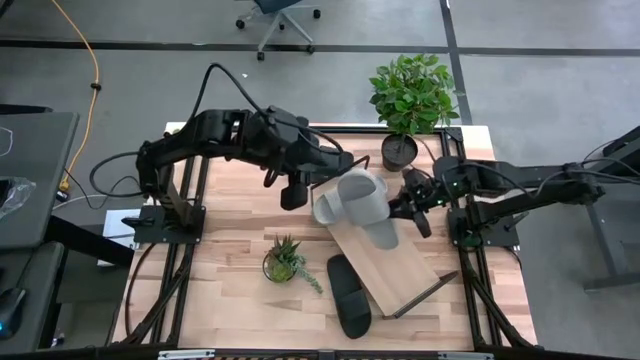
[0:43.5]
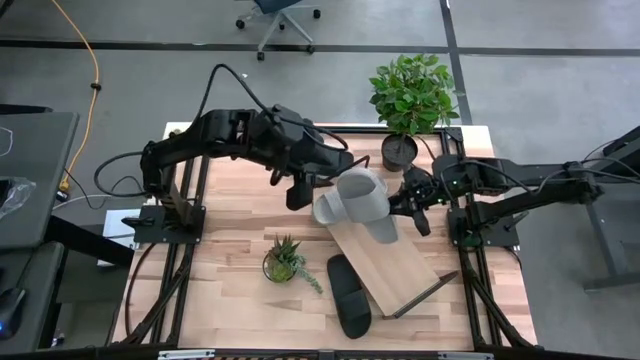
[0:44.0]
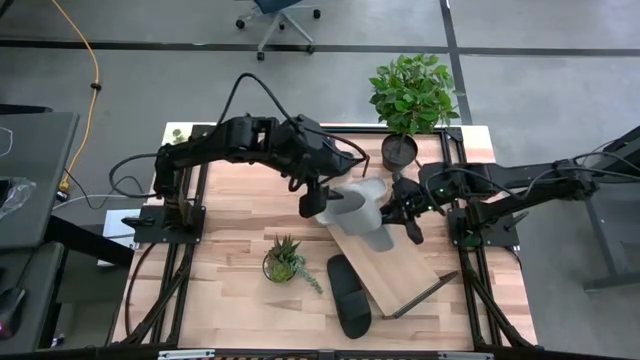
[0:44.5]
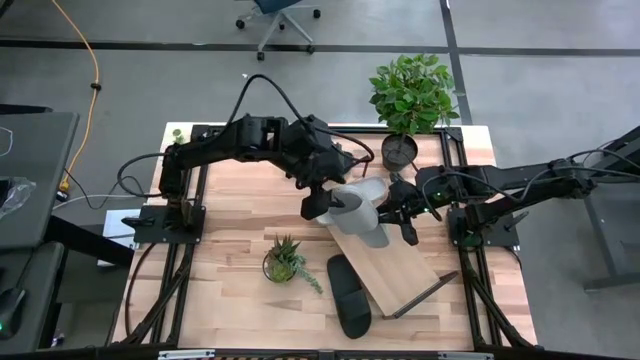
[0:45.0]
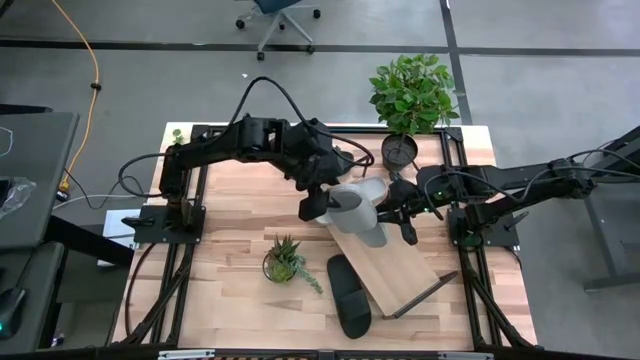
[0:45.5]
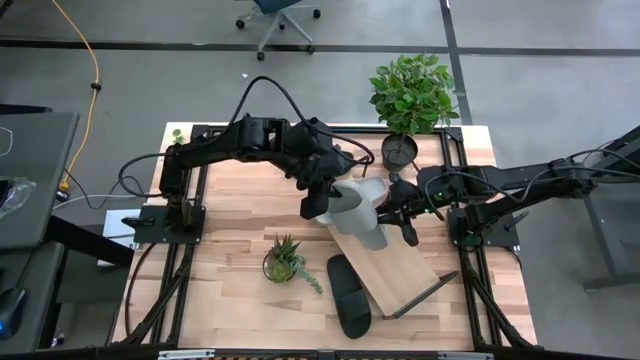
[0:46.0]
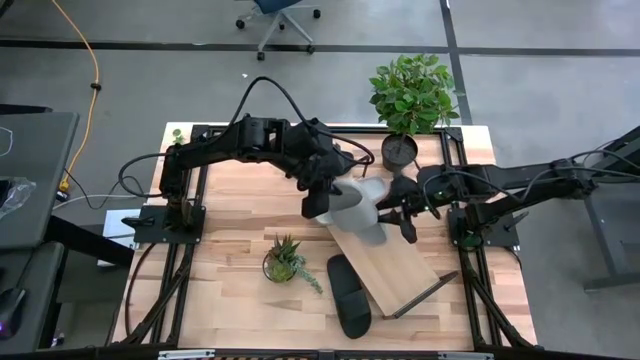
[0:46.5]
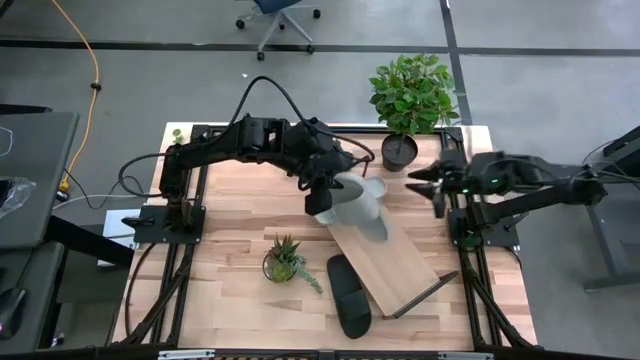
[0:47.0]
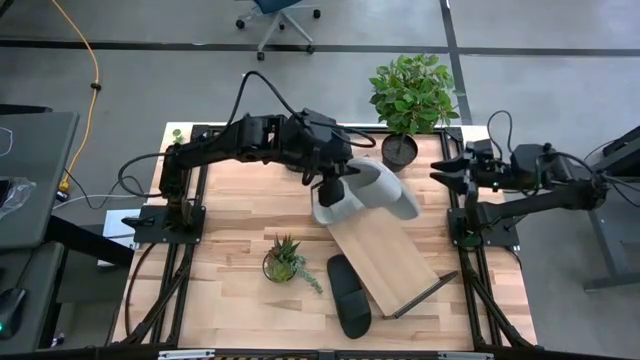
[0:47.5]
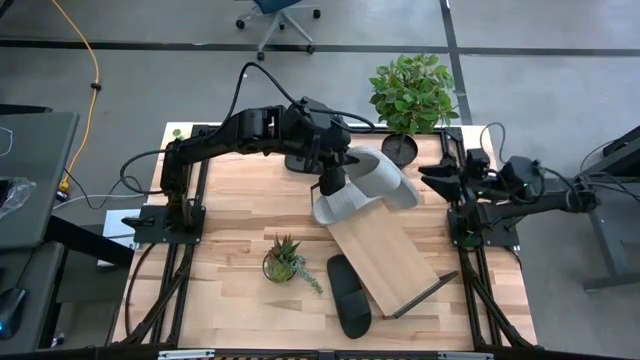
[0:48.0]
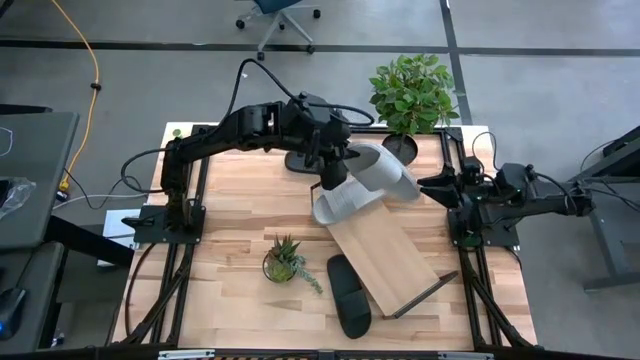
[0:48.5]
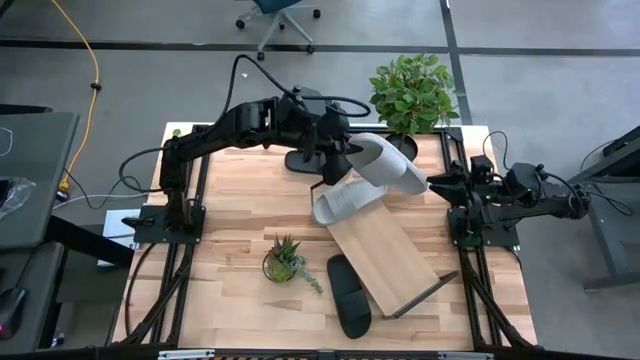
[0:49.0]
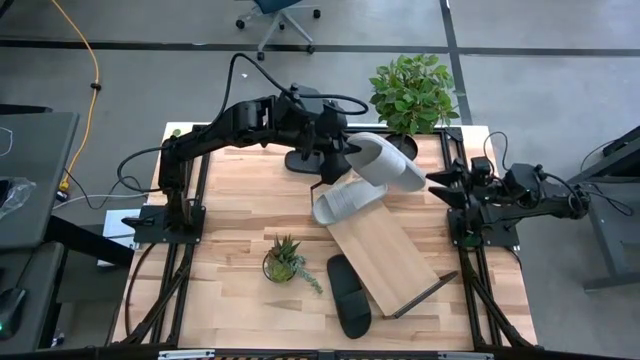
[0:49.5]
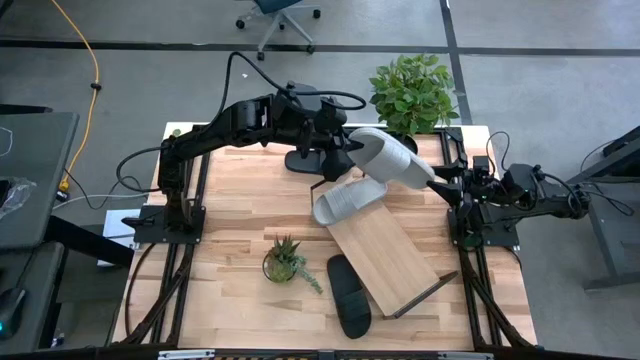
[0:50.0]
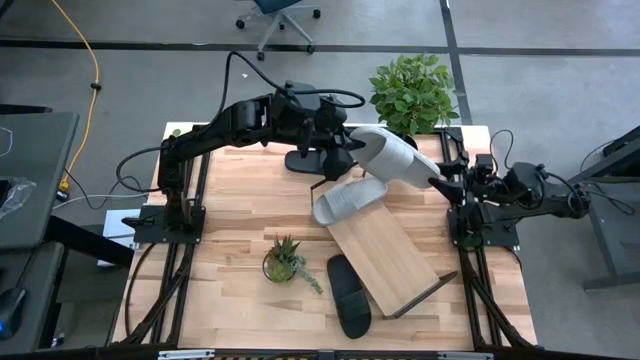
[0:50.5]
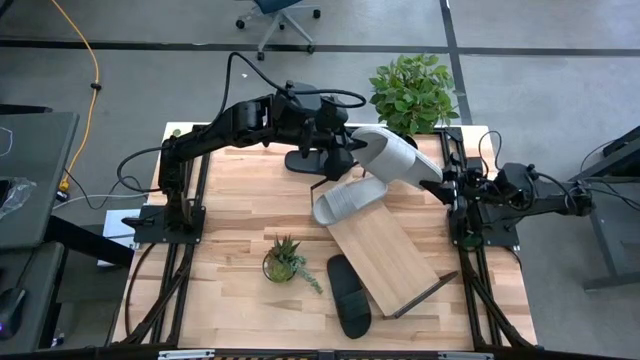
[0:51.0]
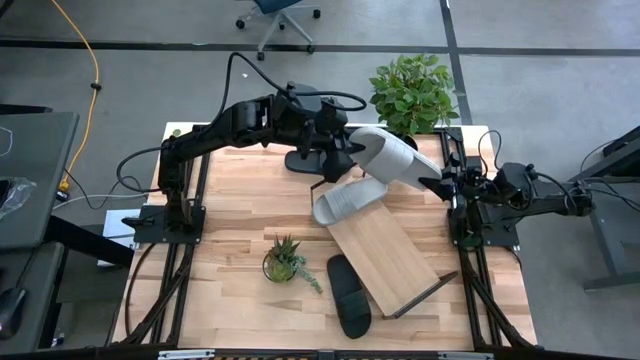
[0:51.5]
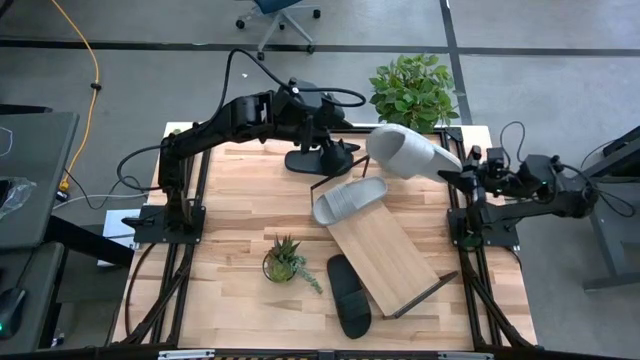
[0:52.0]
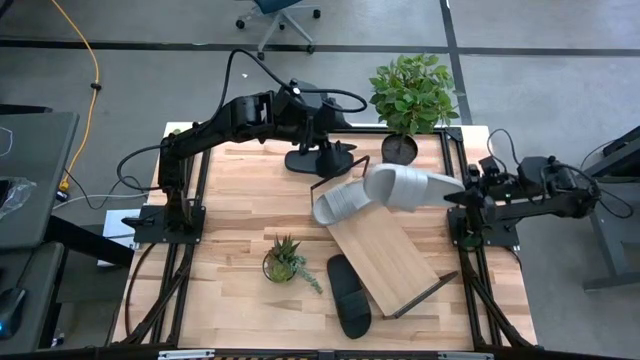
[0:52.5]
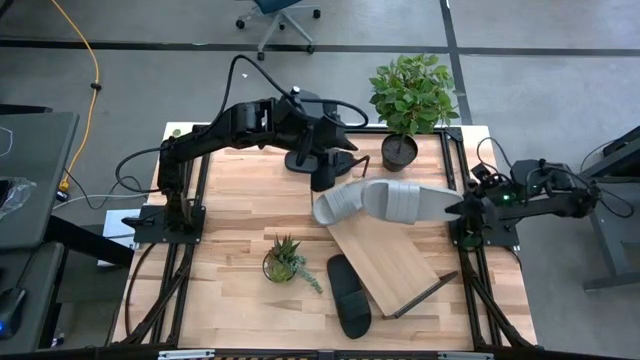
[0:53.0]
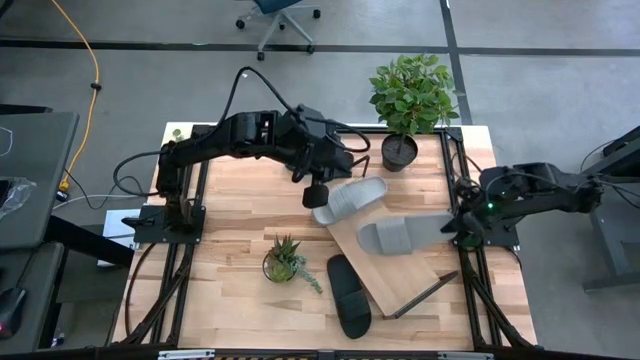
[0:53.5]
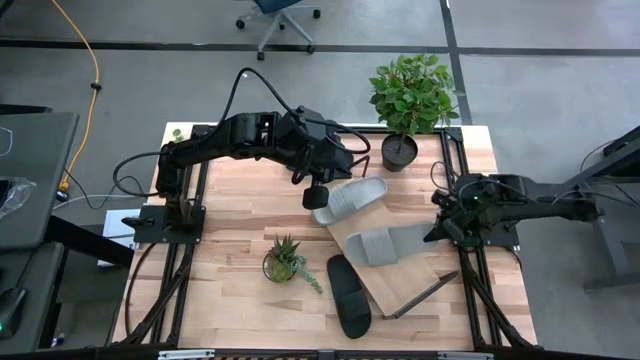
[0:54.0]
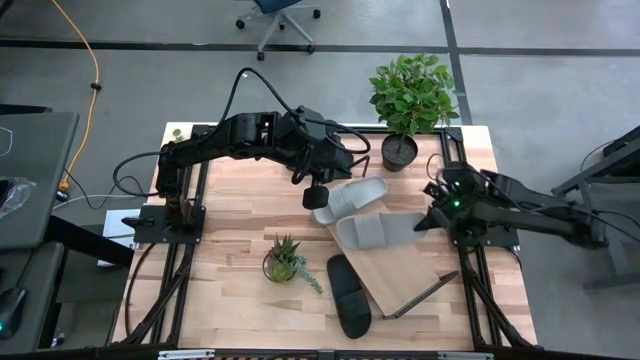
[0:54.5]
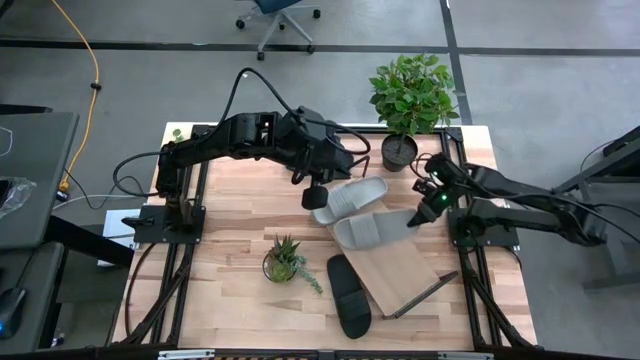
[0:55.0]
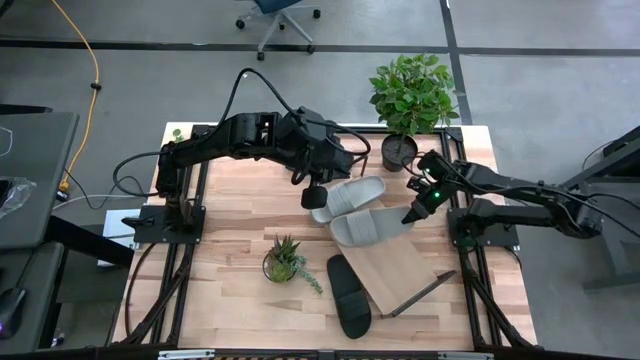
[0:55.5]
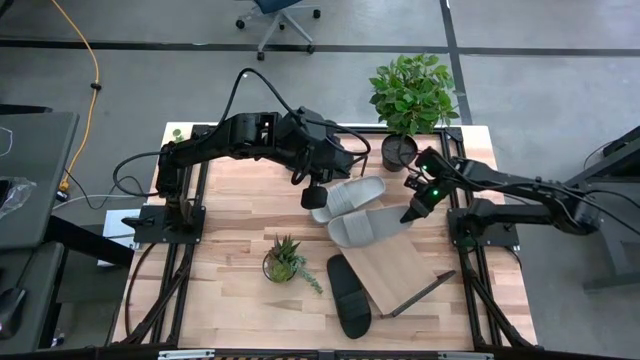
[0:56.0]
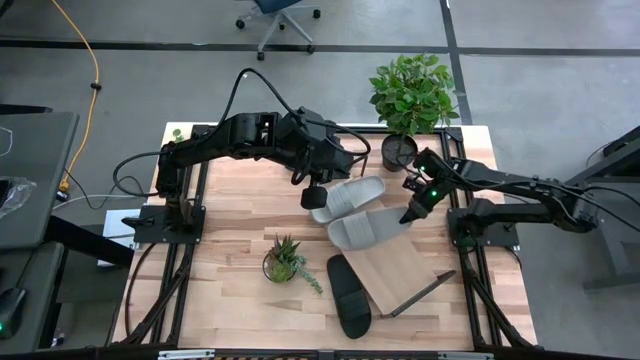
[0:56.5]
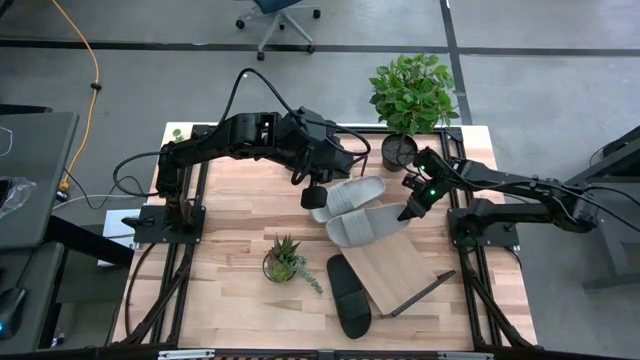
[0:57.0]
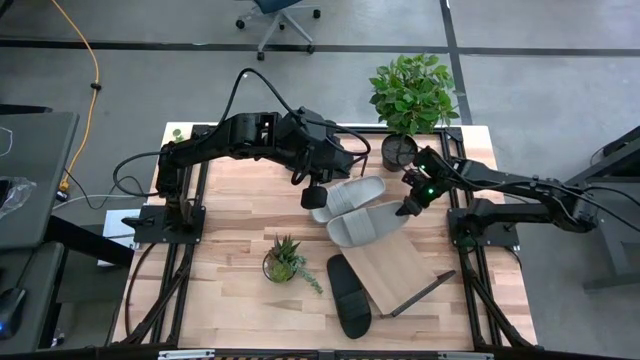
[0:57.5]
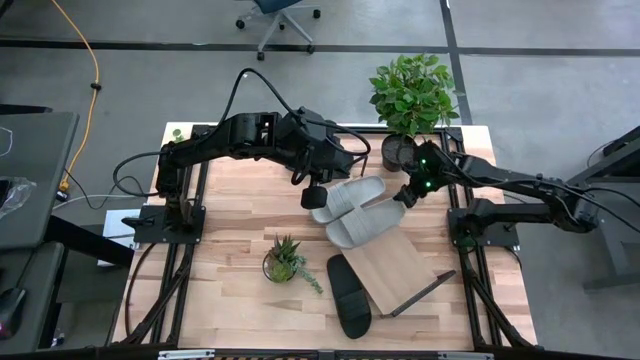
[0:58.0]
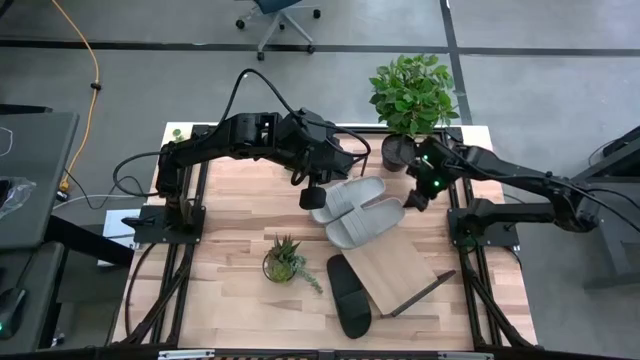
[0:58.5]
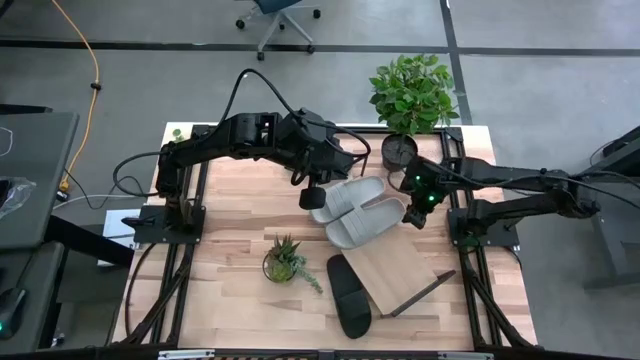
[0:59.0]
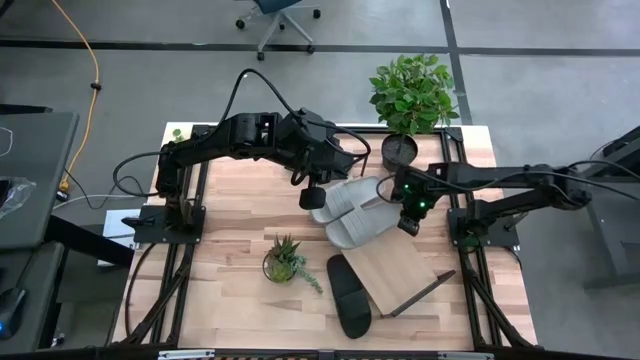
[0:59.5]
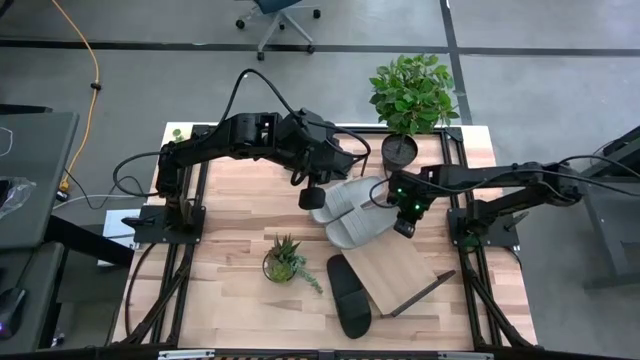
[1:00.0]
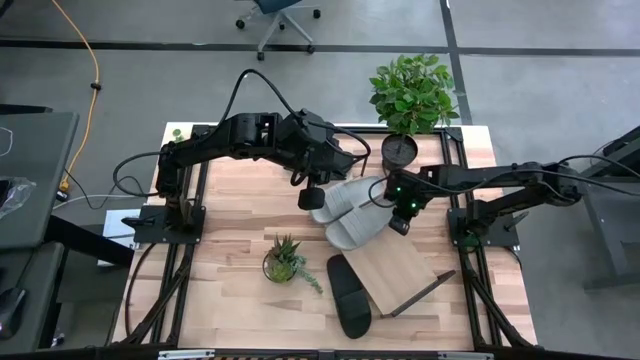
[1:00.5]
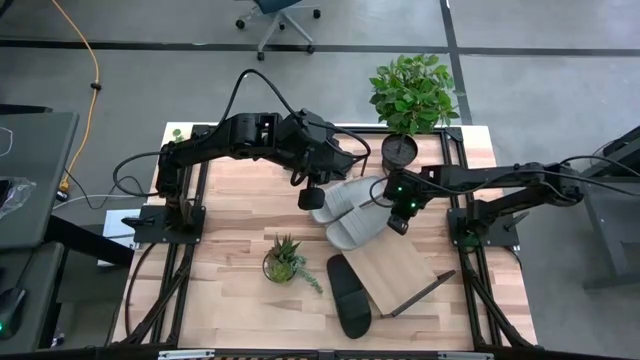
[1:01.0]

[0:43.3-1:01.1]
Task: Pick and place slides into the shelf
Put the gray slide on the shelf
